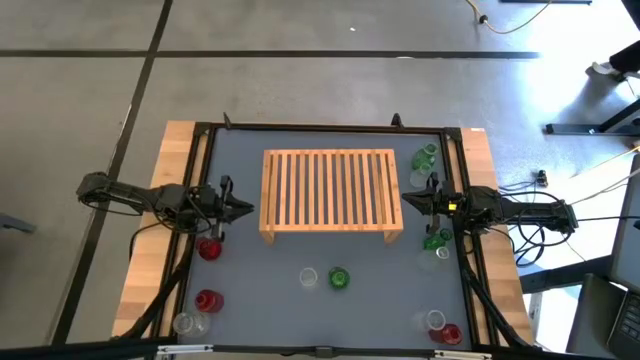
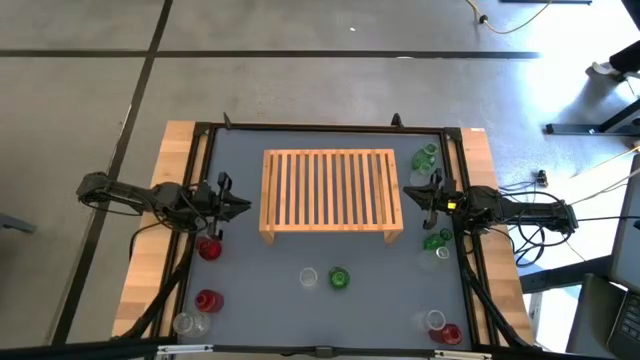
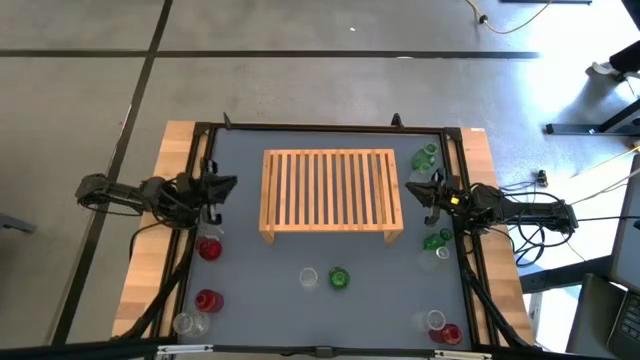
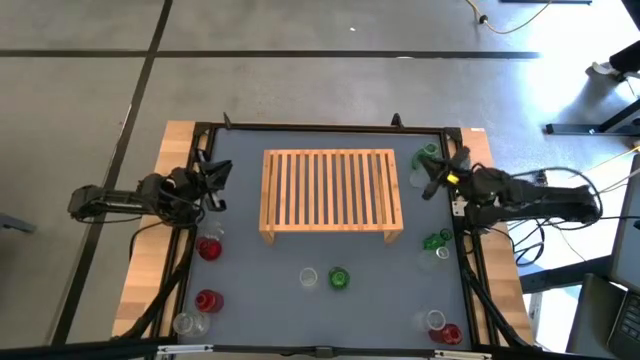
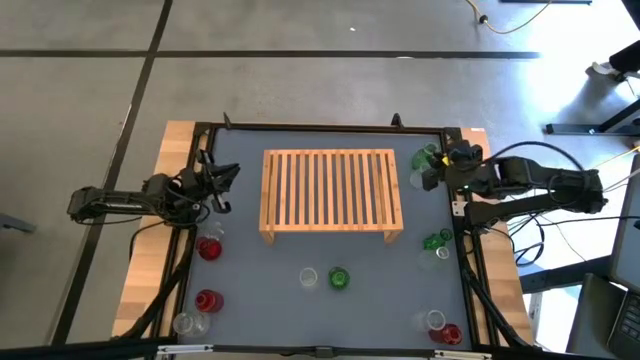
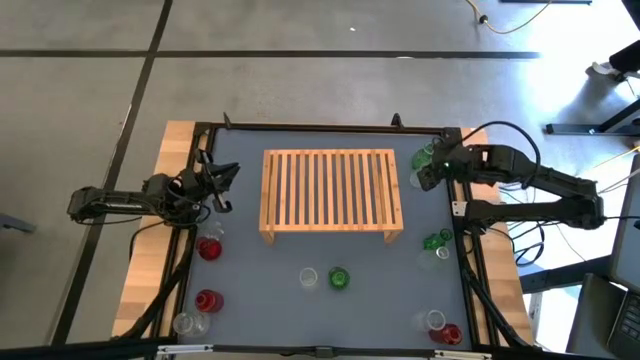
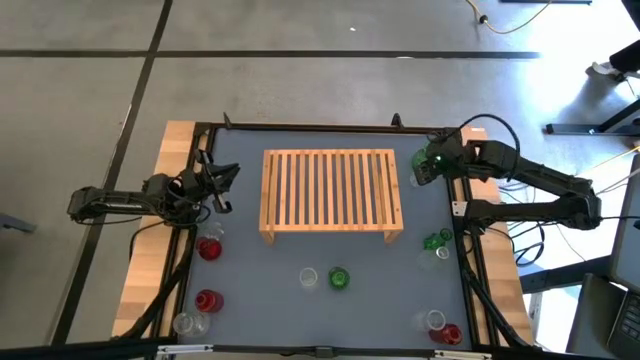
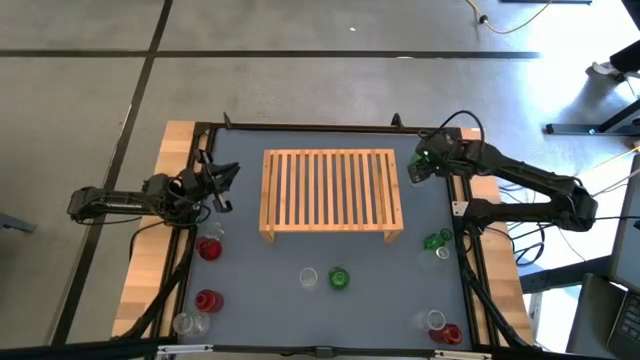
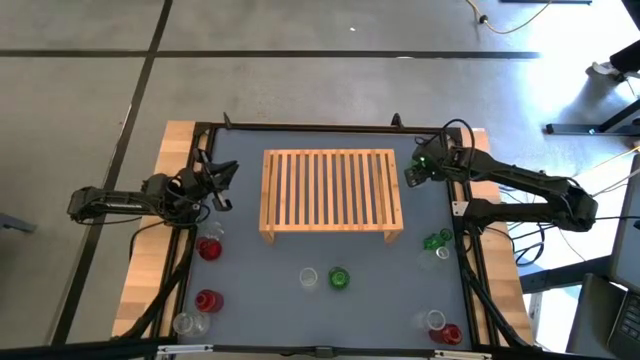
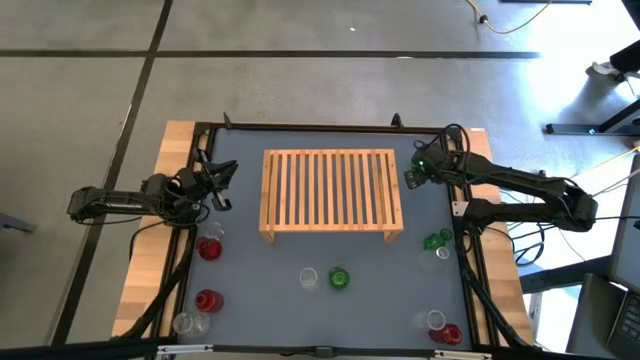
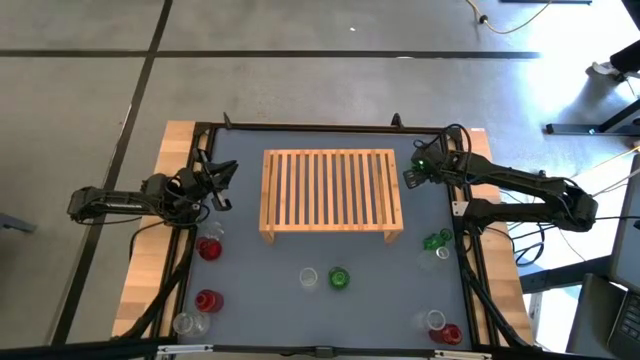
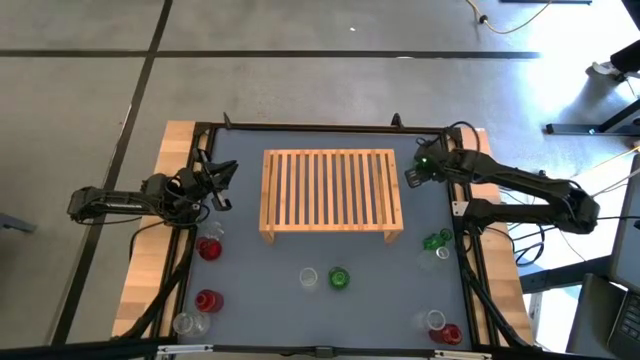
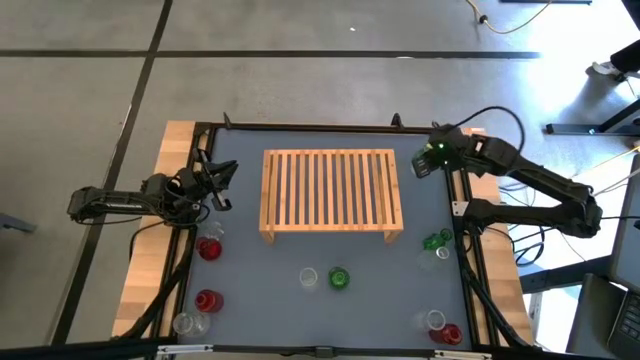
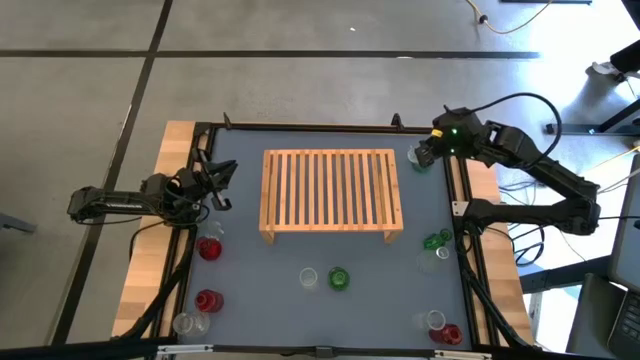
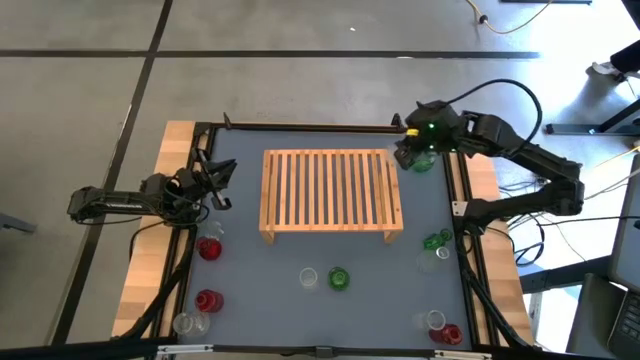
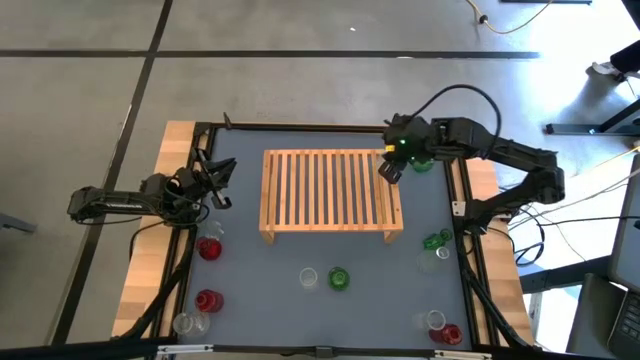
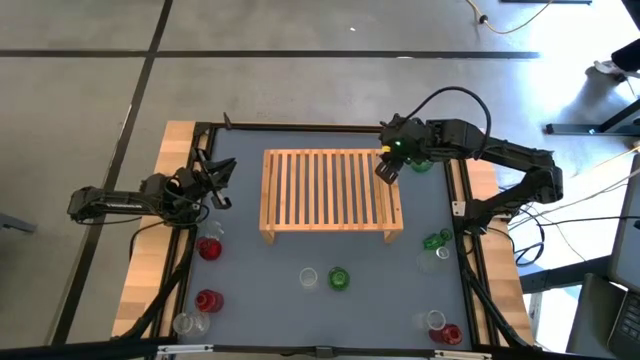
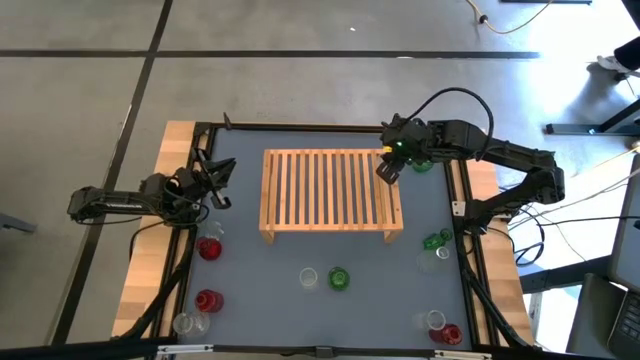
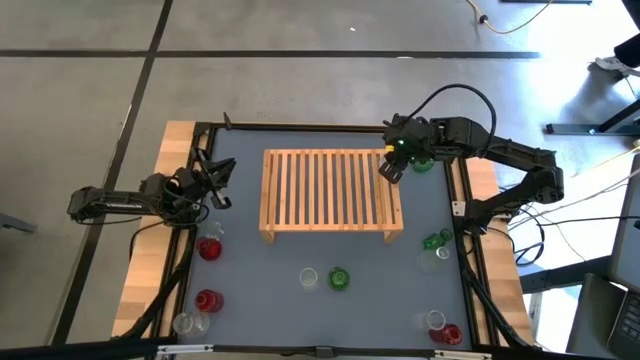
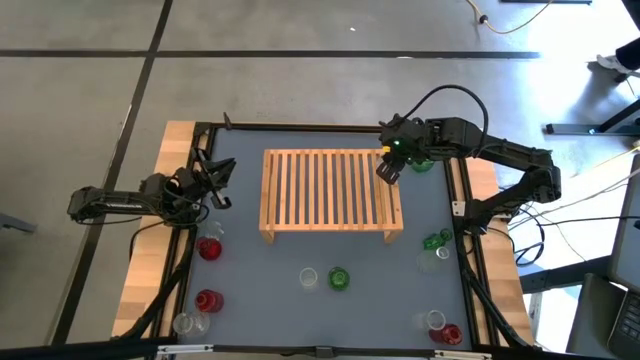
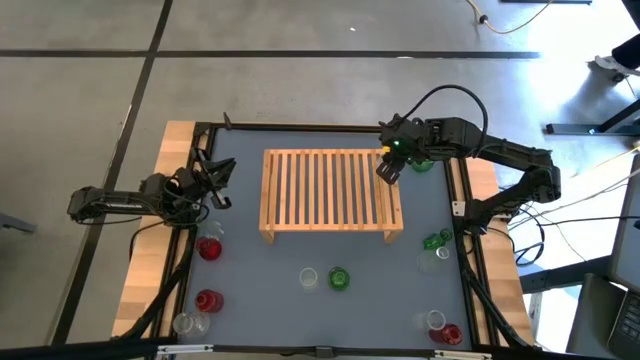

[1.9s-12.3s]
Task: sort vases onto shelf
Put the transparent bottle on the shelf

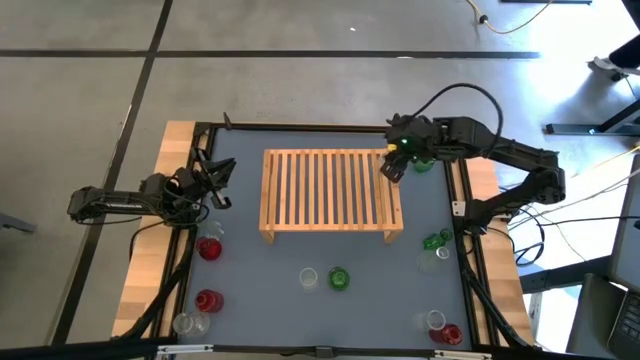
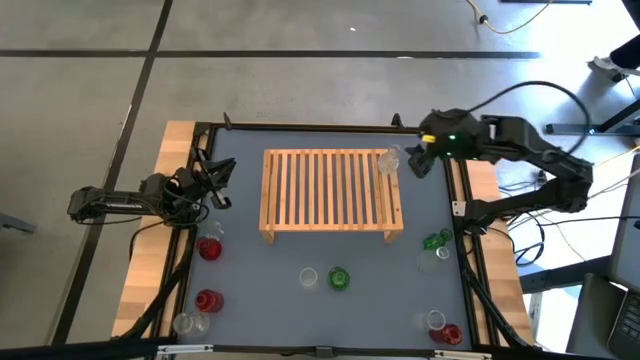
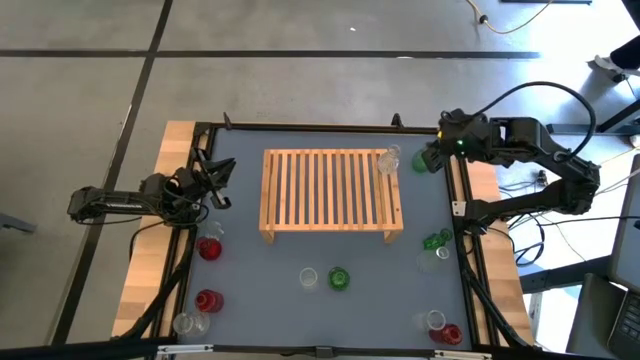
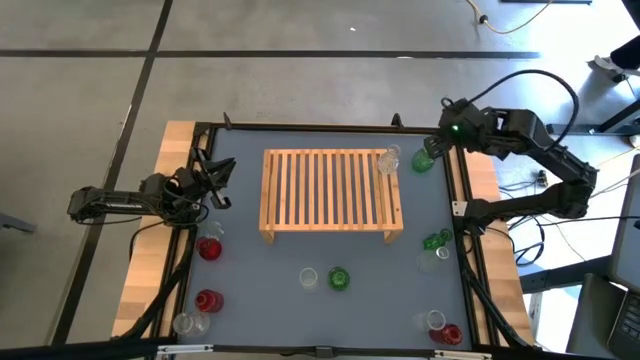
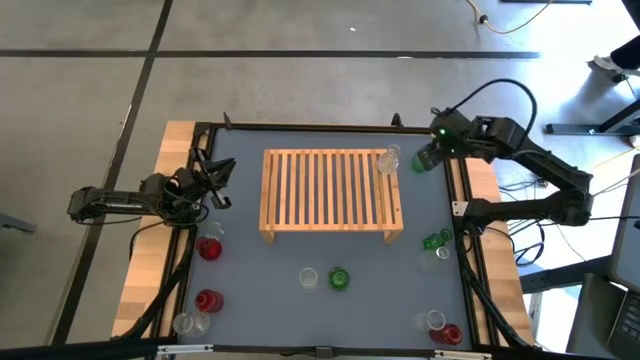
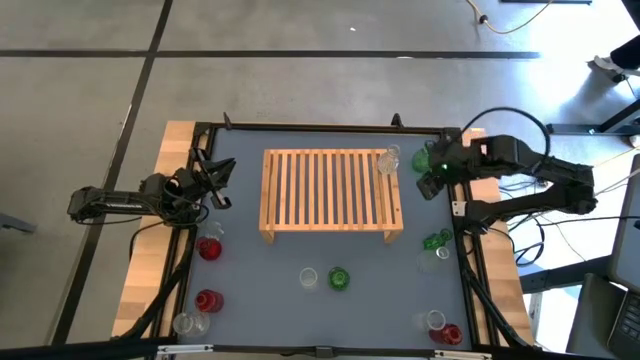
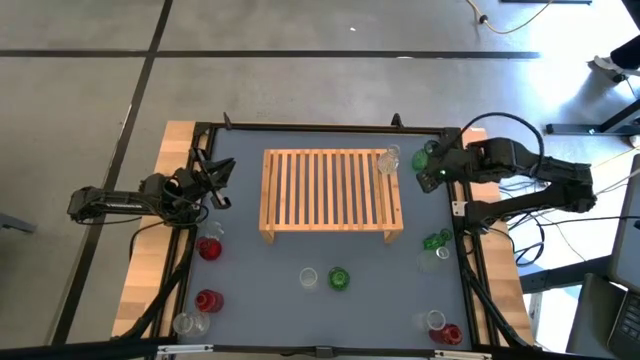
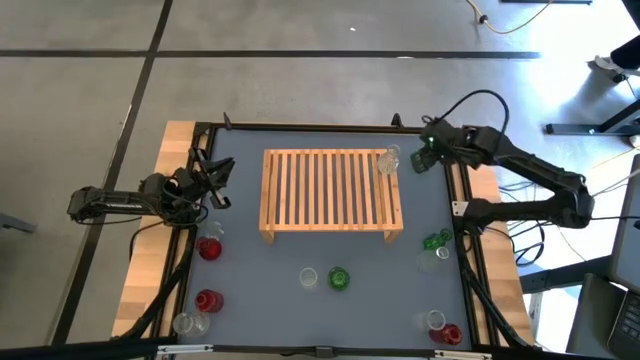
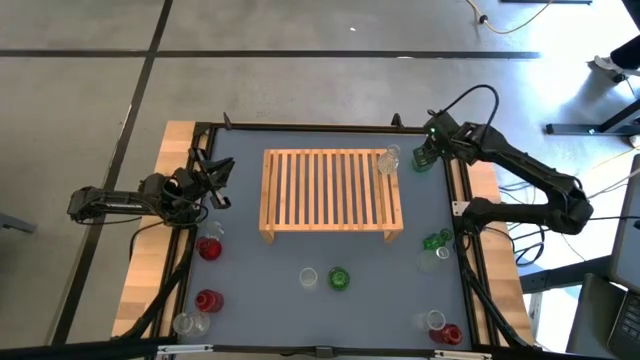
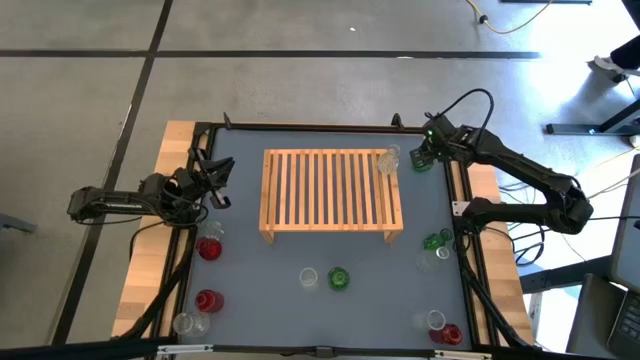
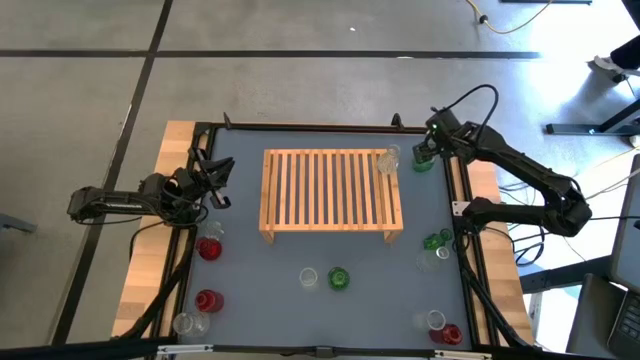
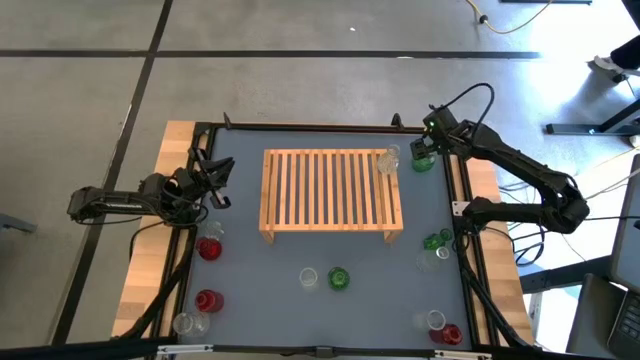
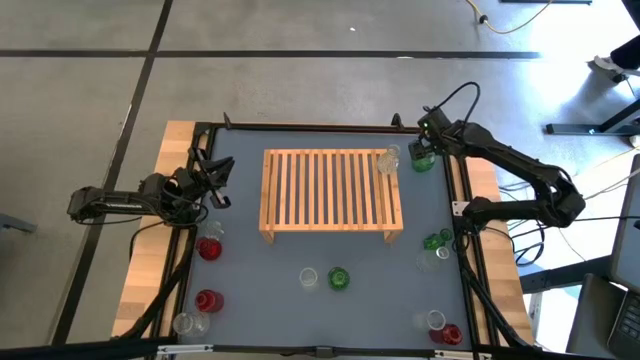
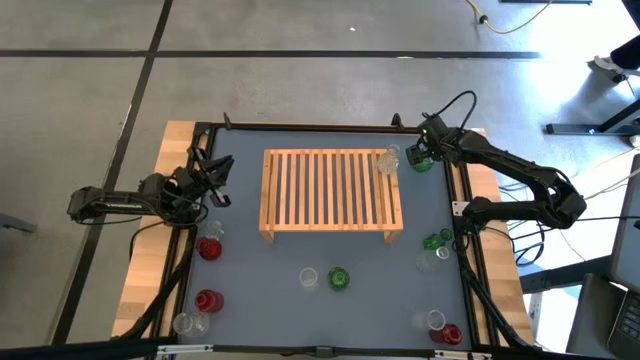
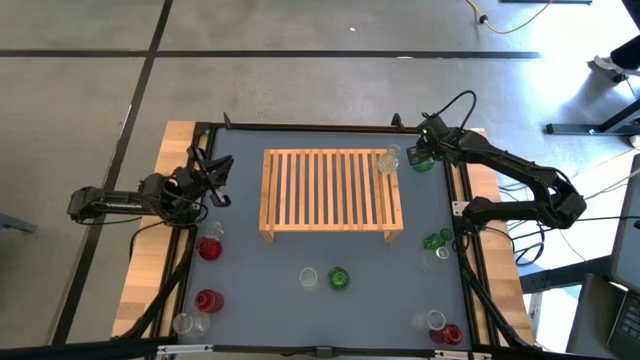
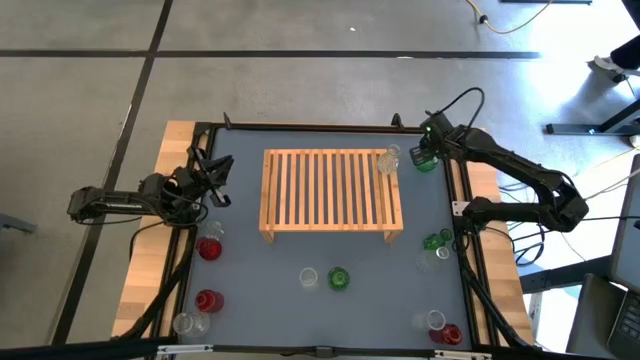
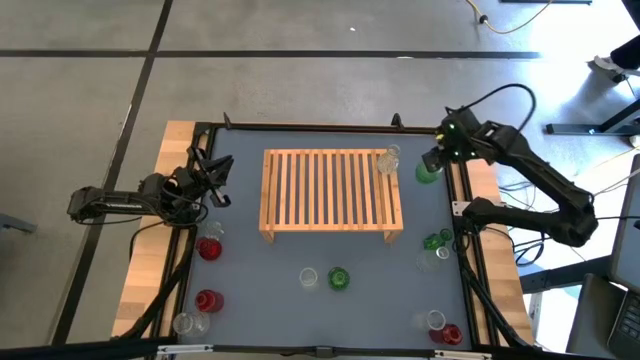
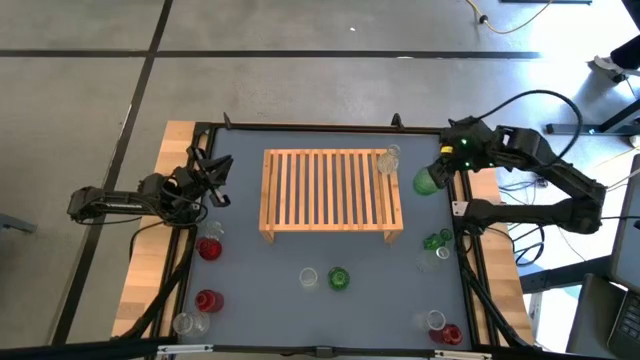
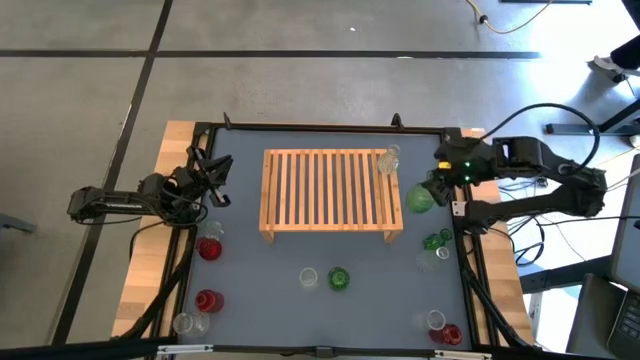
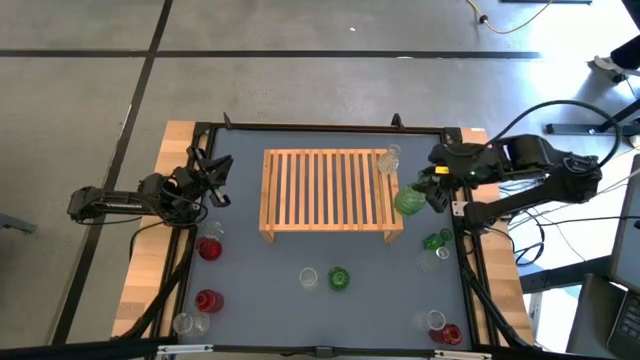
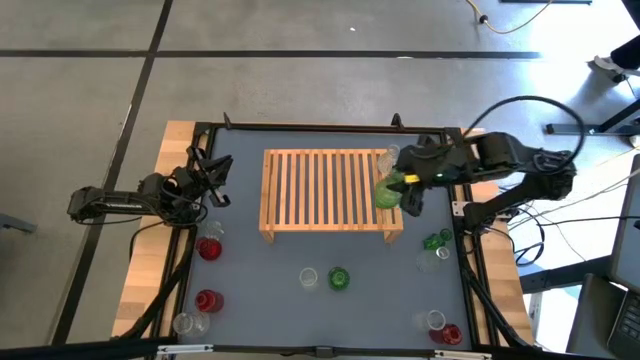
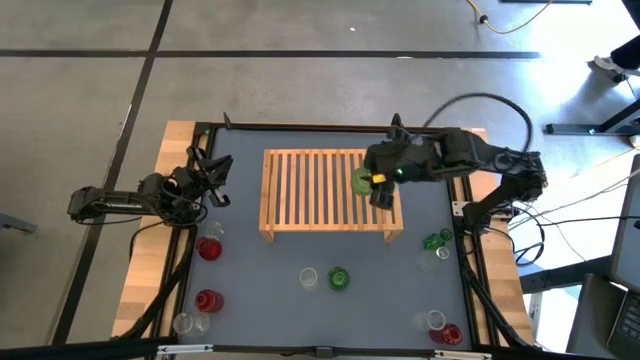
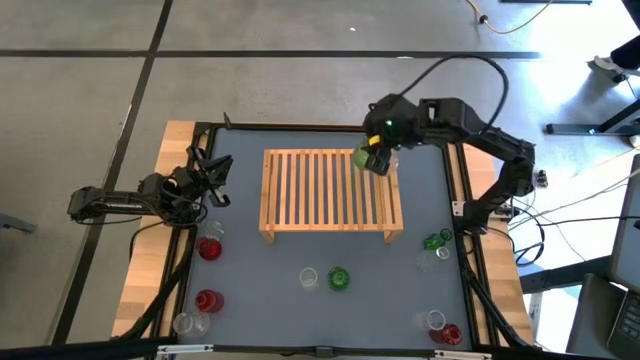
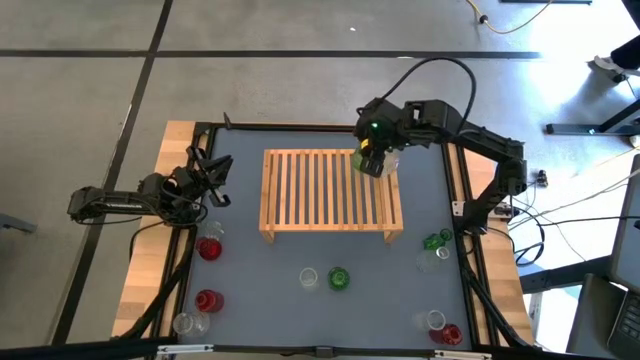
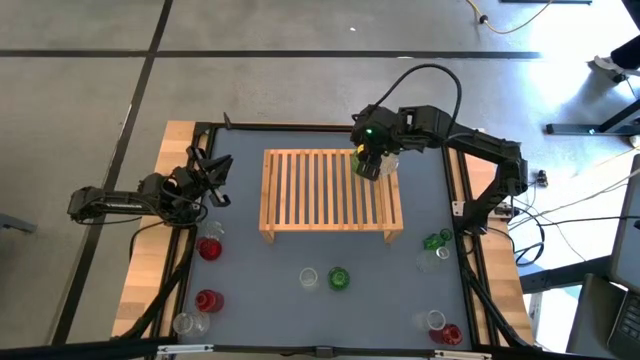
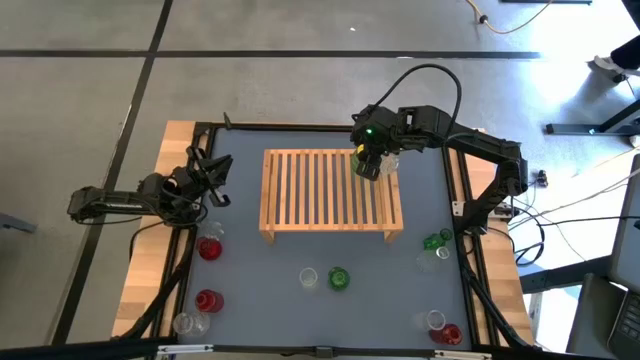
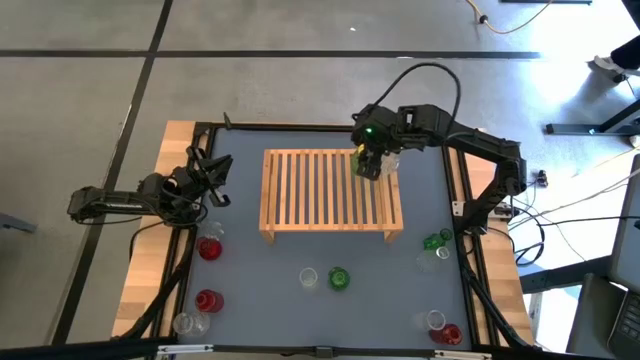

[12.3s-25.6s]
Put the top right green bottle on the shelf
